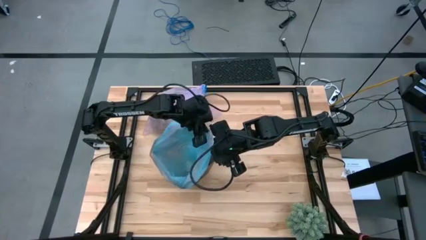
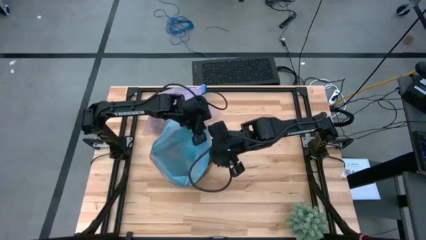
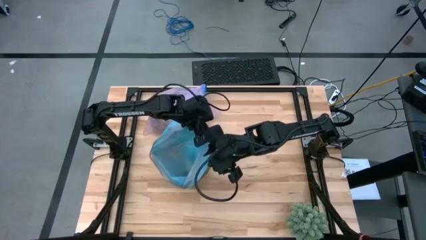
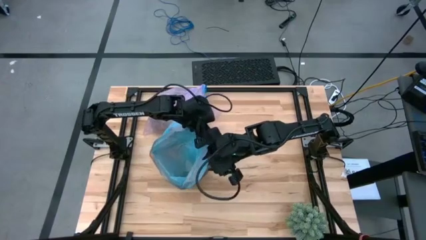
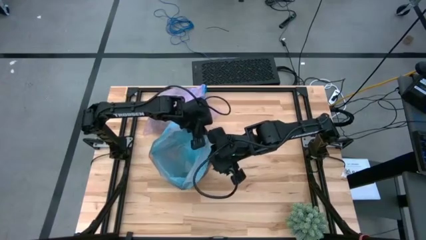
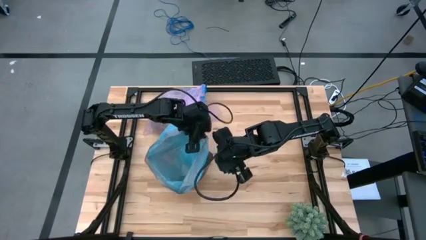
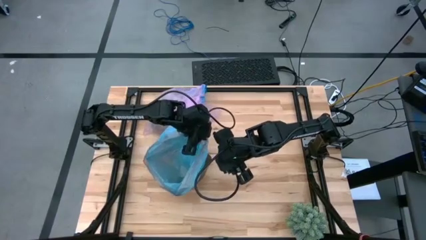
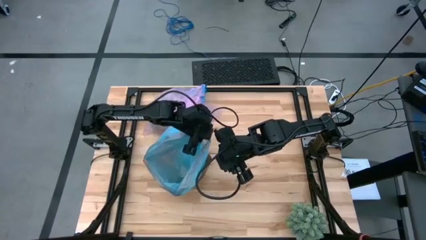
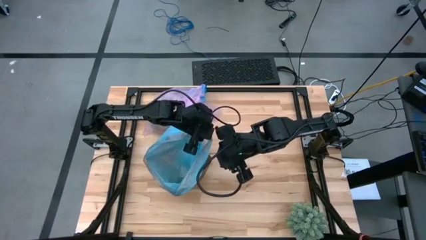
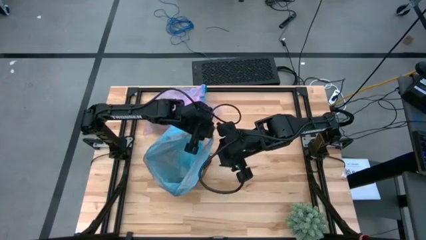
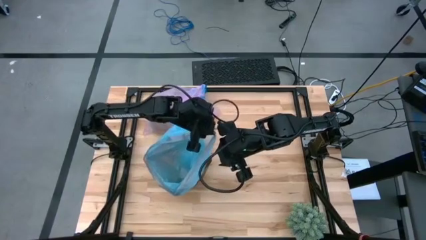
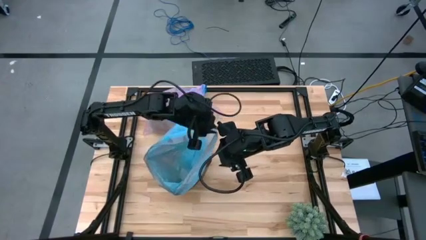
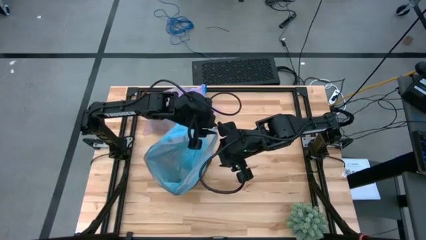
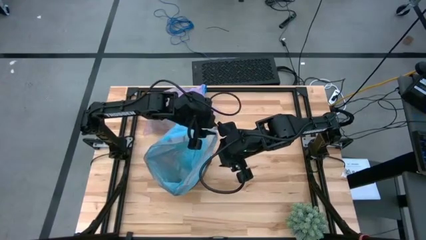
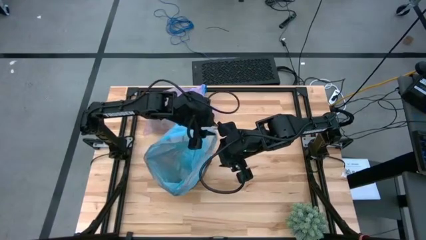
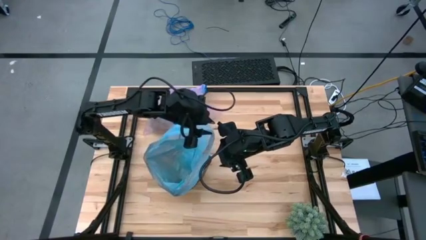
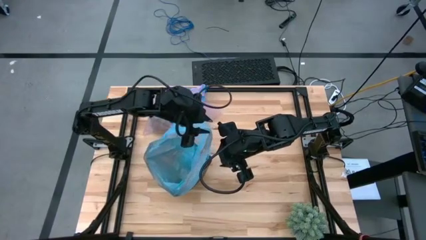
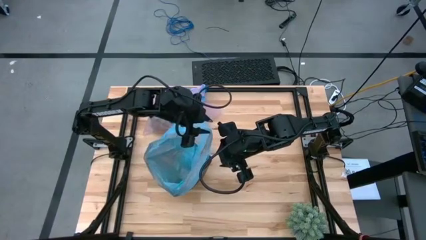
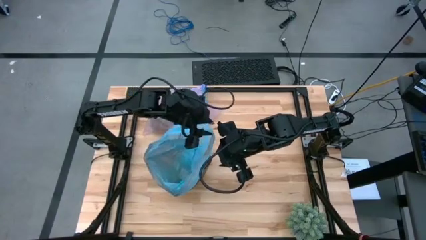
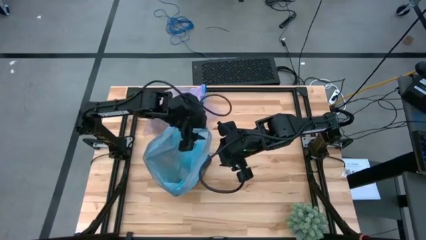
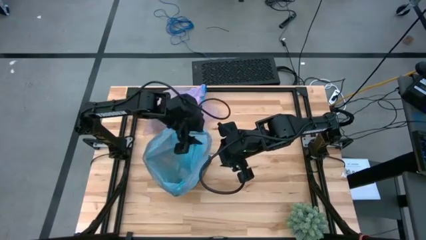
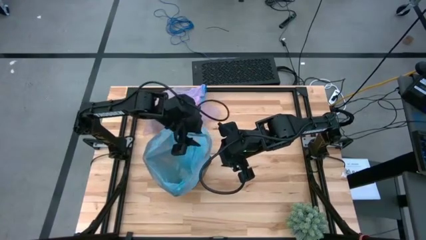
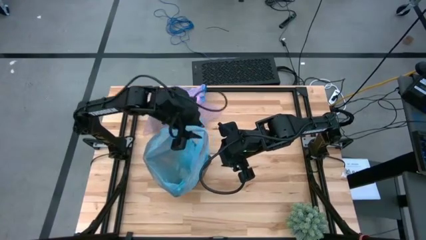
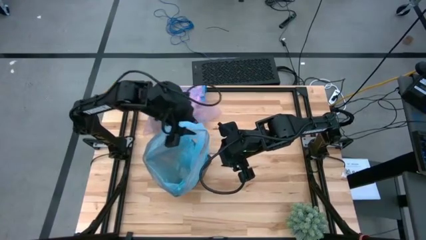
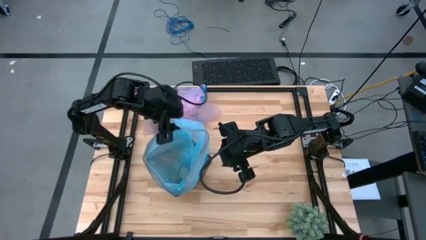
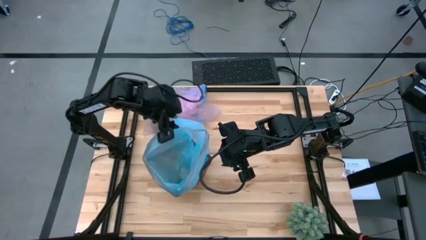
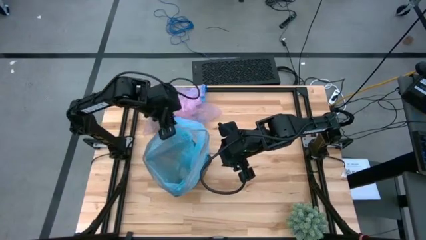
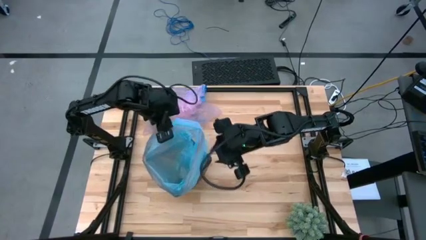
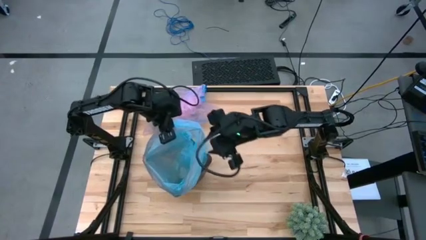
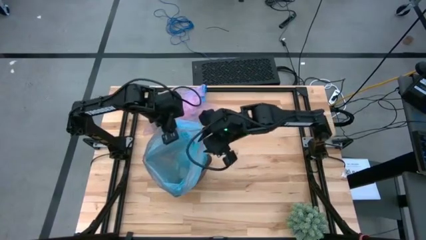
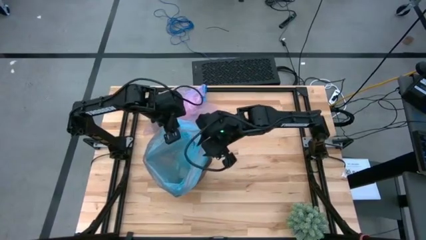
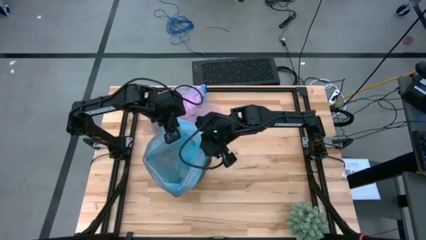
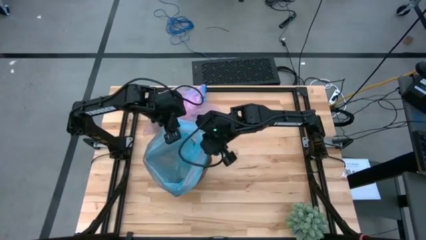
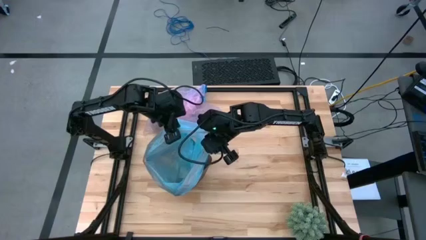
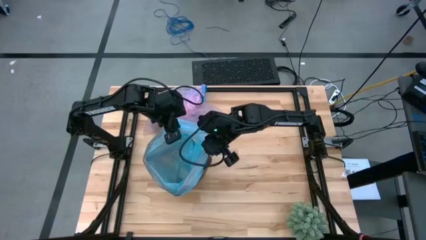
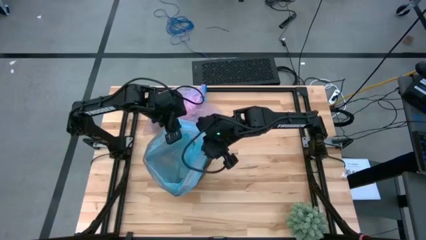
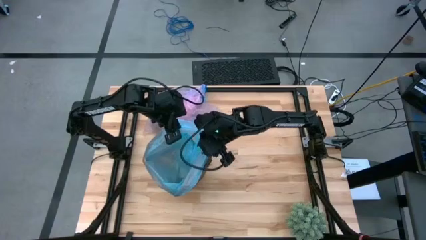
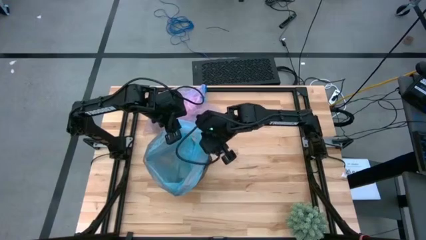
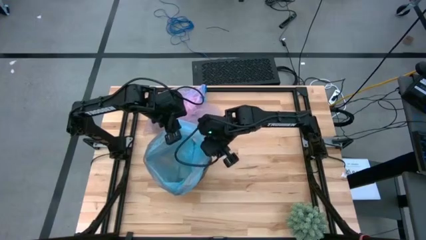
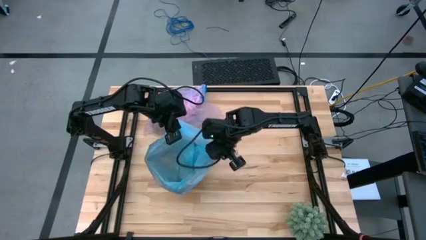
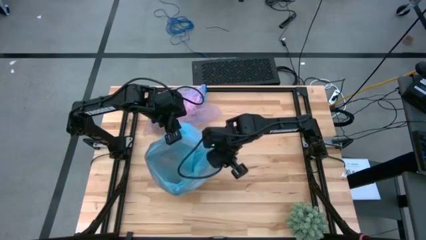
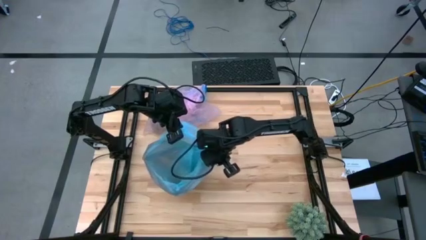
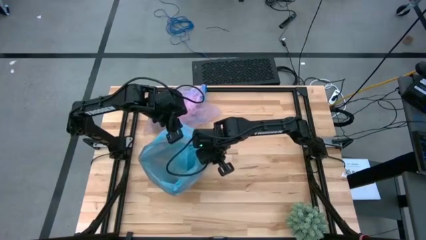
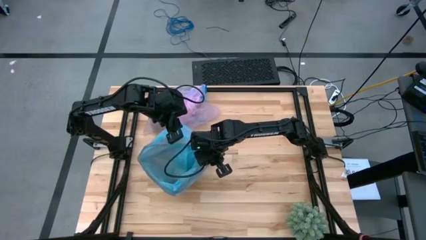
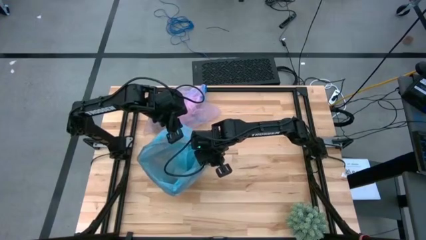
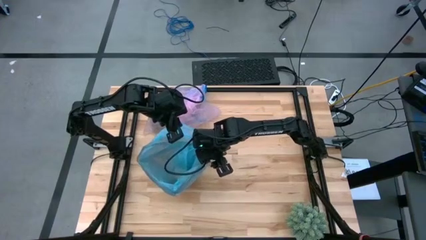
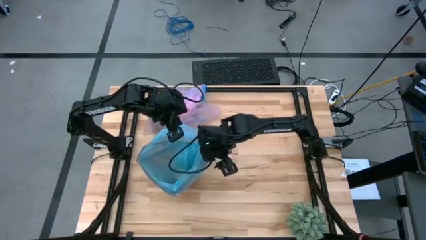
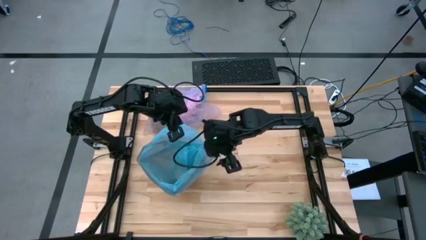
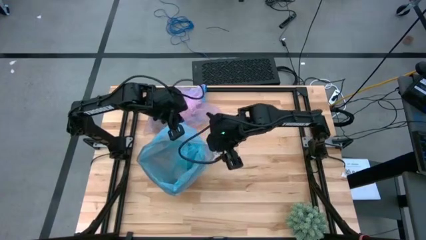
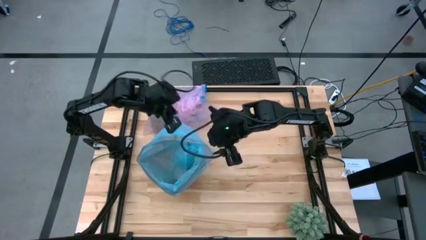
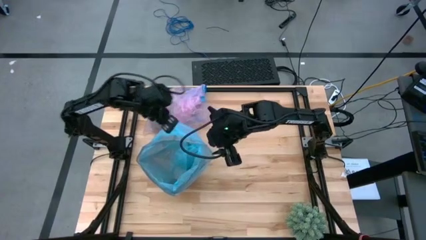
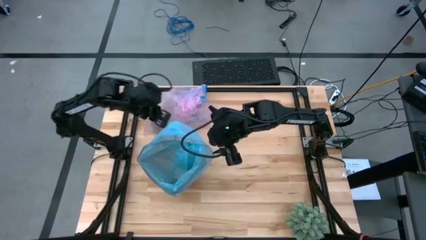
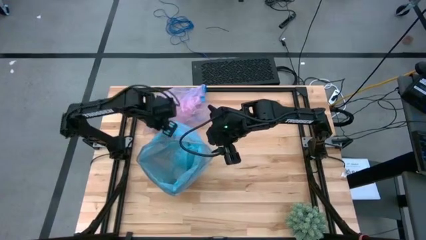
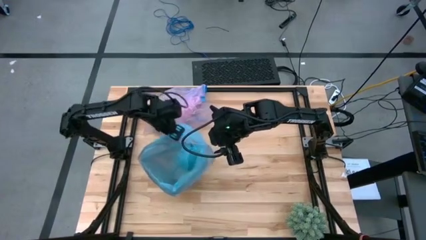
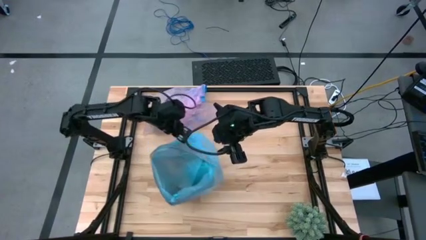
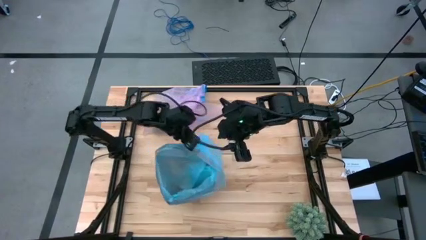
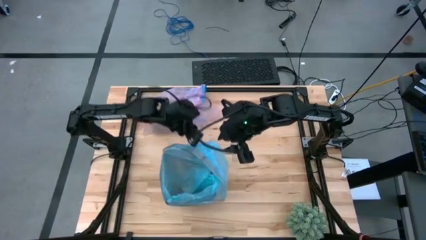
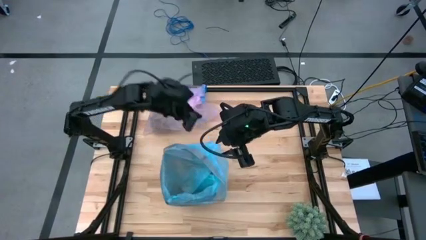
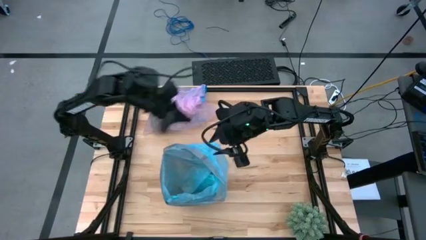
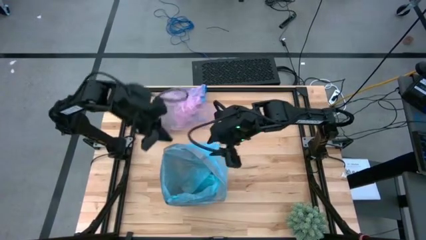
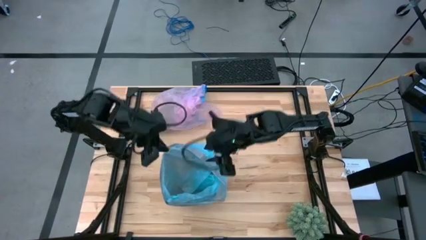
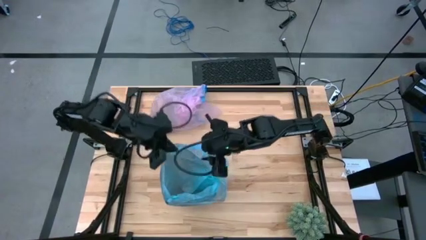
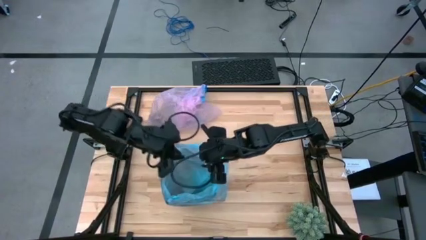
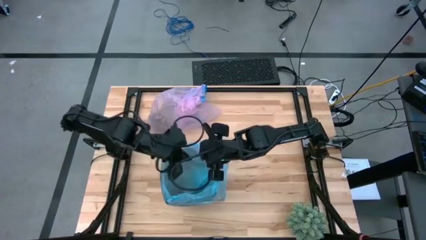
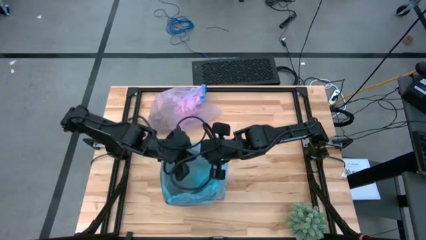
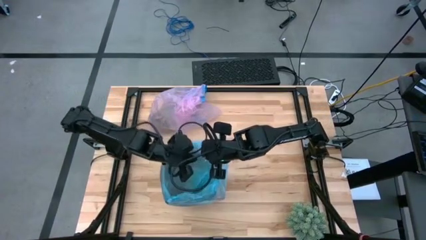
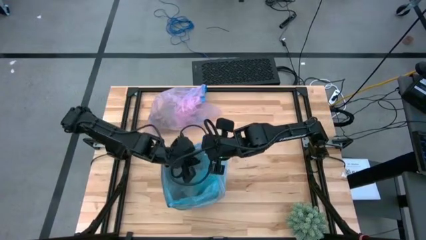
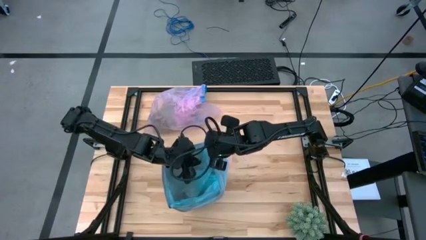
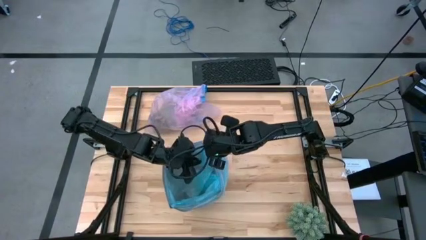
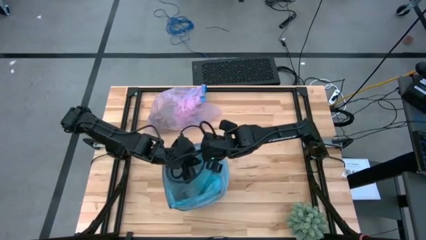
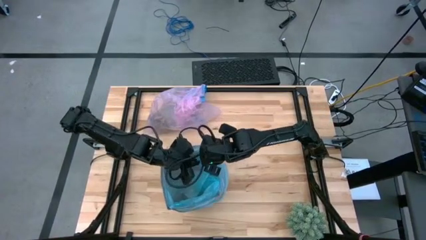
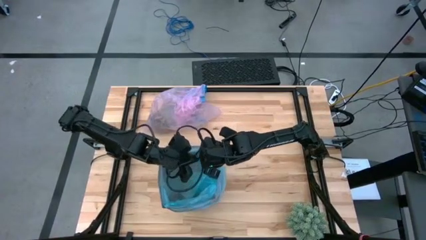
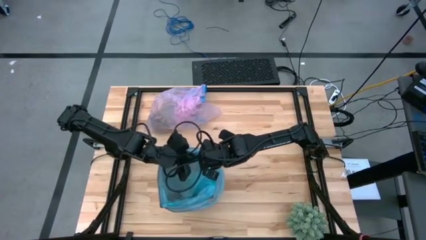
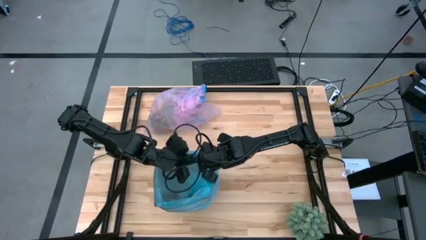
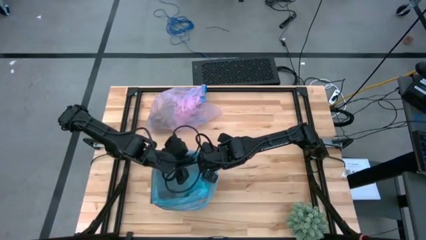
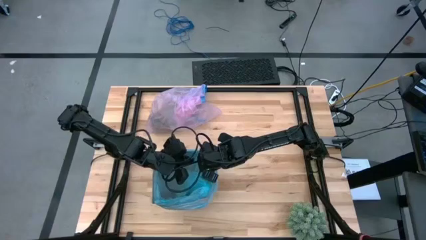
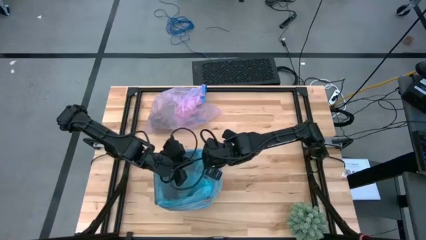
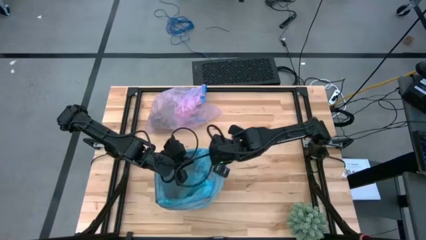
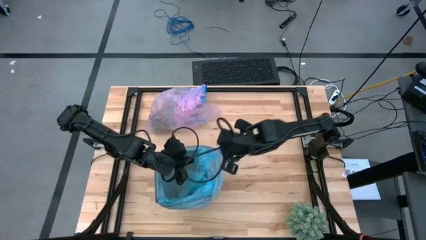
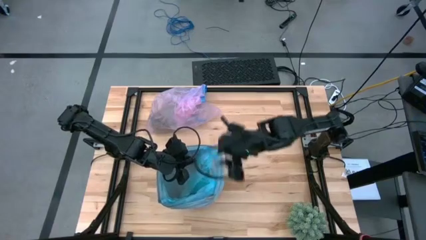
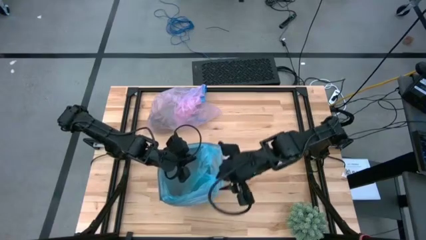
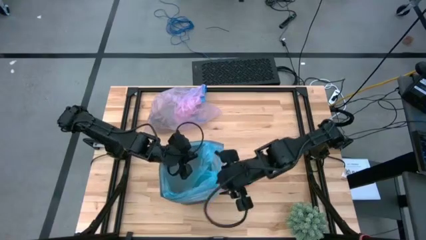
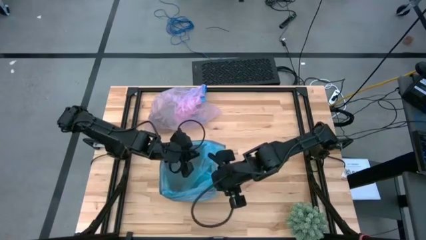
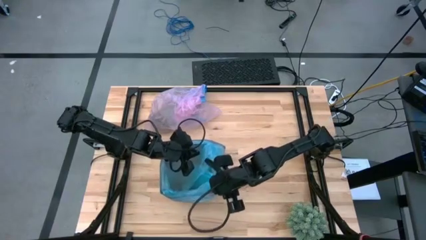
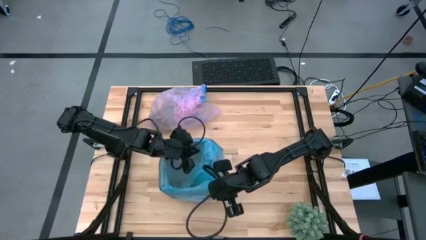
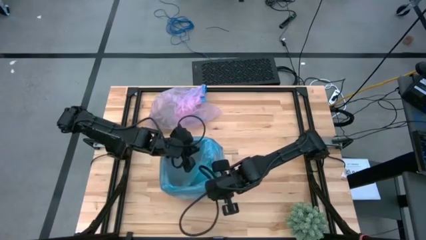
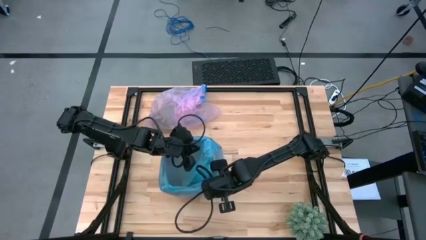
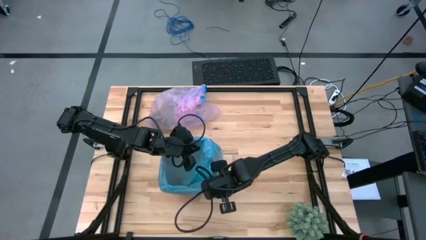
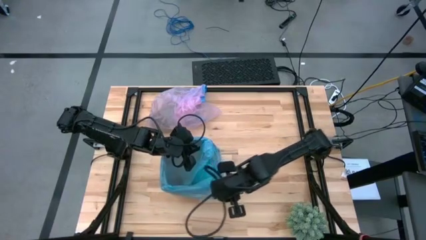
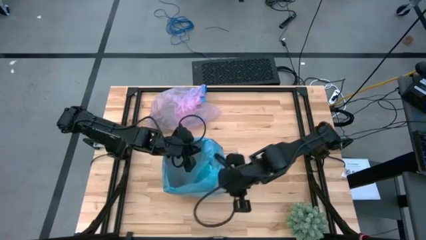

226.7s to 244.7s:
Task: place trash/remove bag and relplace
Insert the new trash bag into the trash bin
